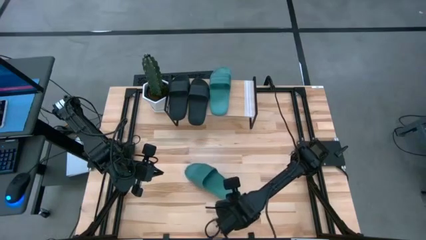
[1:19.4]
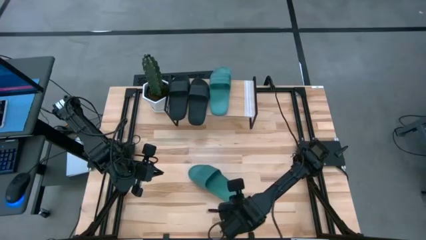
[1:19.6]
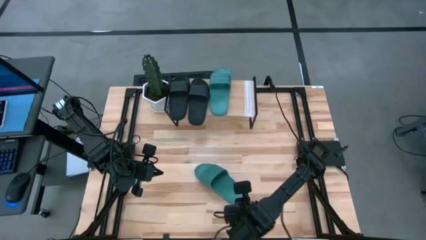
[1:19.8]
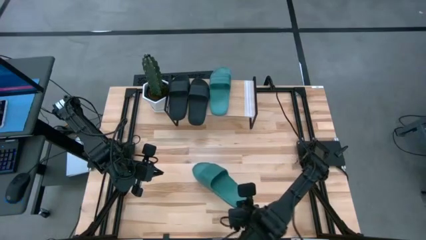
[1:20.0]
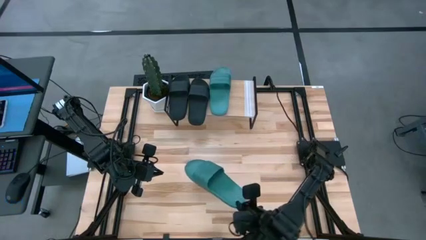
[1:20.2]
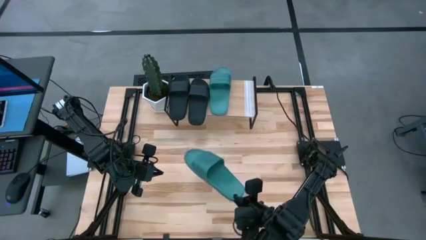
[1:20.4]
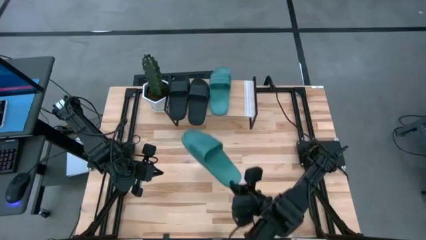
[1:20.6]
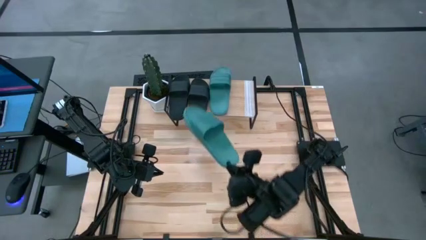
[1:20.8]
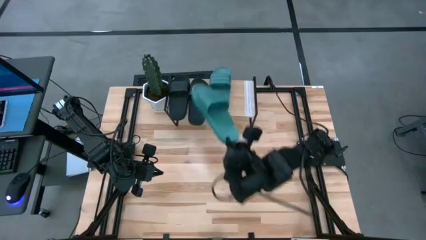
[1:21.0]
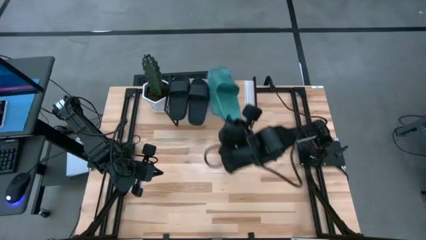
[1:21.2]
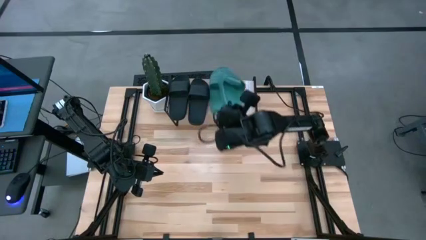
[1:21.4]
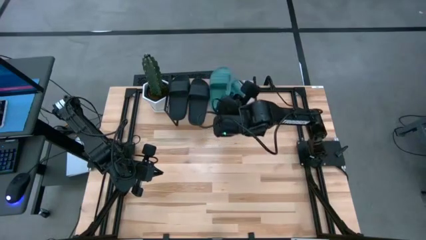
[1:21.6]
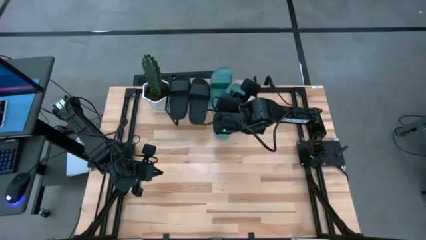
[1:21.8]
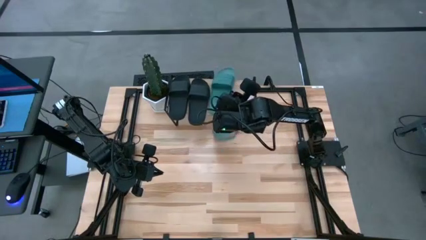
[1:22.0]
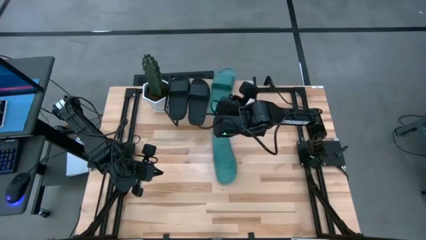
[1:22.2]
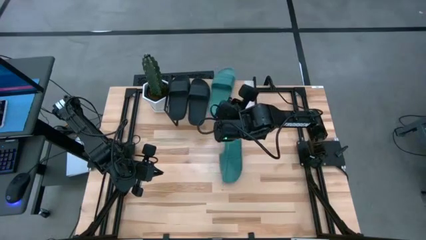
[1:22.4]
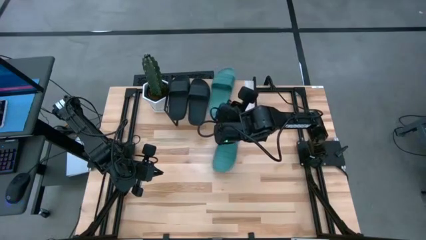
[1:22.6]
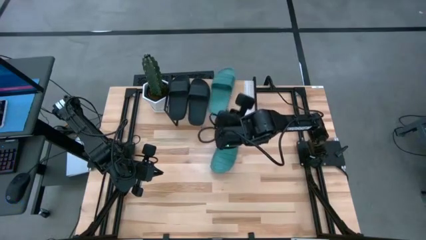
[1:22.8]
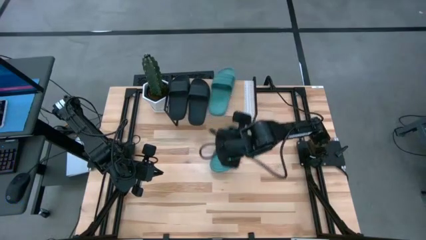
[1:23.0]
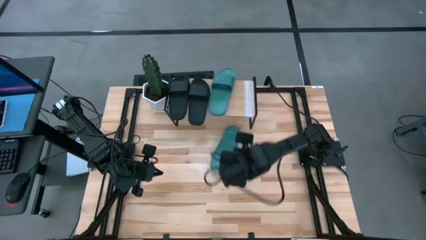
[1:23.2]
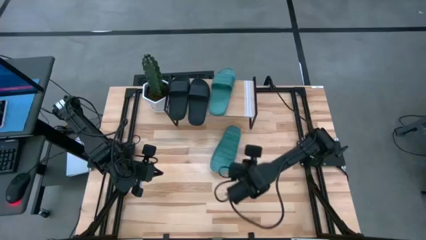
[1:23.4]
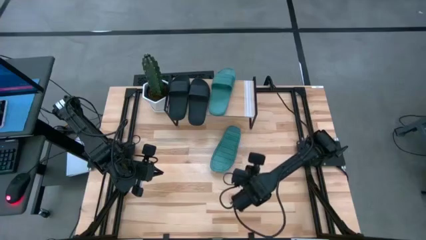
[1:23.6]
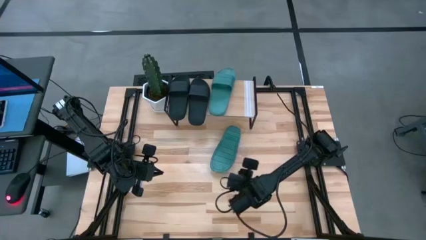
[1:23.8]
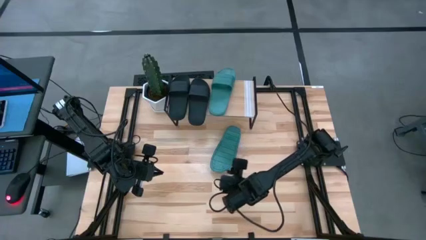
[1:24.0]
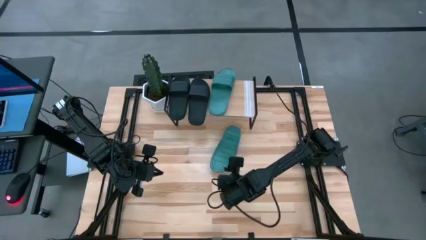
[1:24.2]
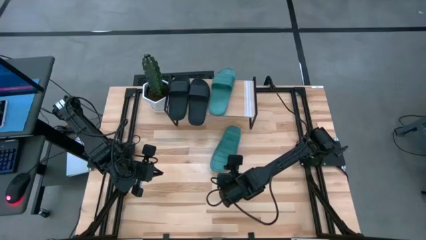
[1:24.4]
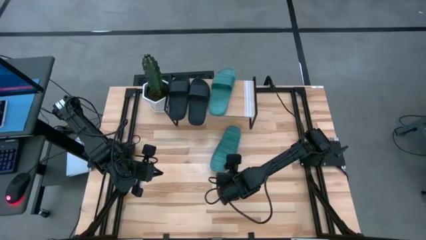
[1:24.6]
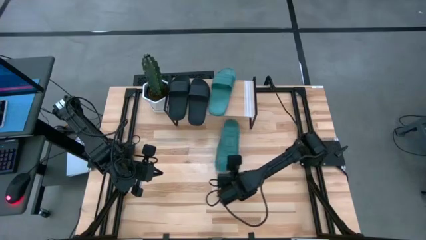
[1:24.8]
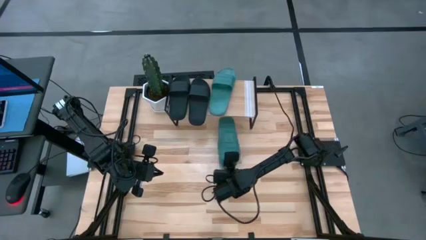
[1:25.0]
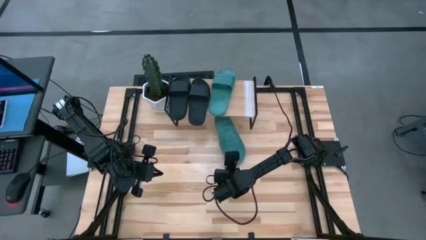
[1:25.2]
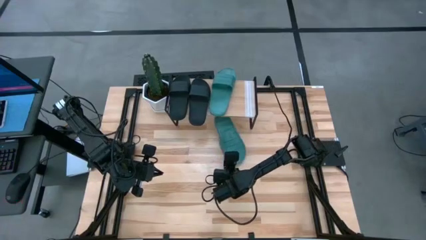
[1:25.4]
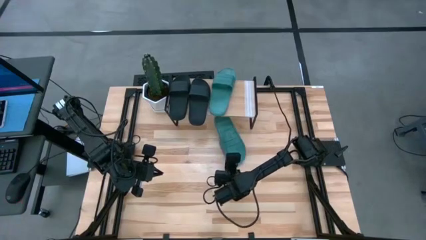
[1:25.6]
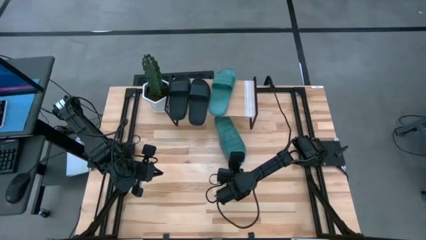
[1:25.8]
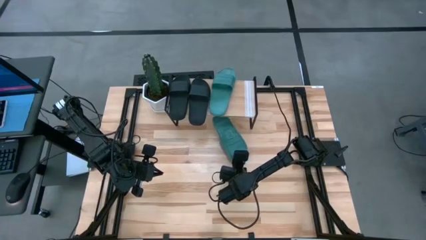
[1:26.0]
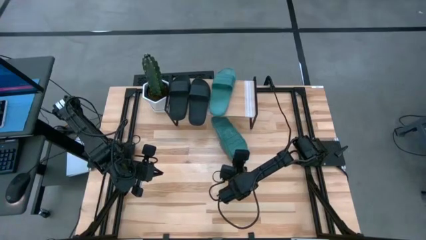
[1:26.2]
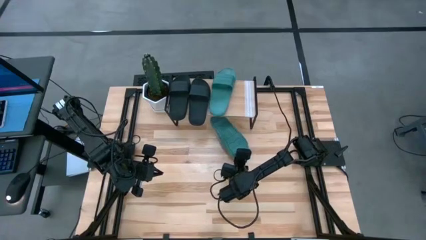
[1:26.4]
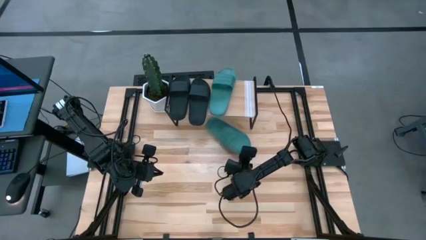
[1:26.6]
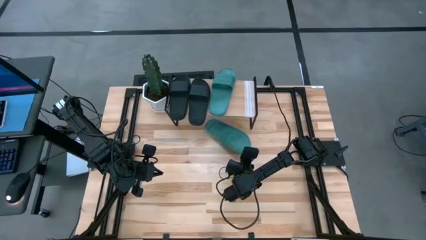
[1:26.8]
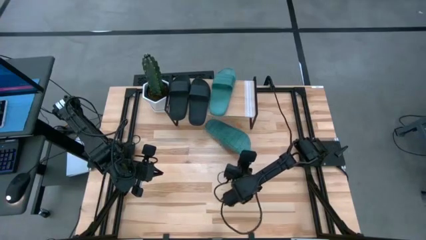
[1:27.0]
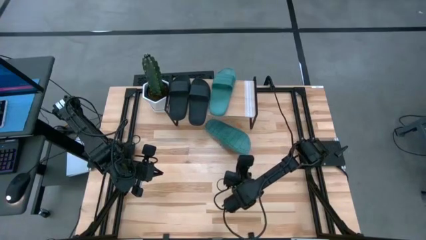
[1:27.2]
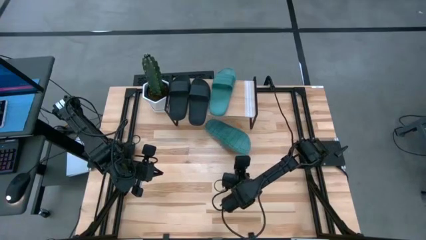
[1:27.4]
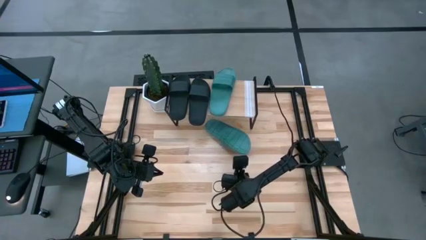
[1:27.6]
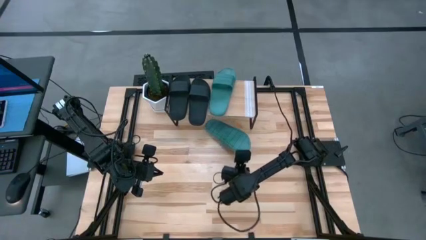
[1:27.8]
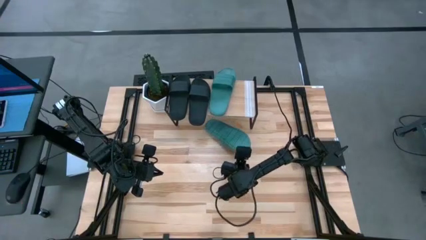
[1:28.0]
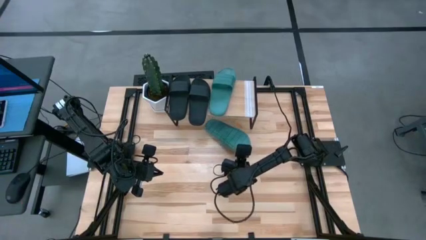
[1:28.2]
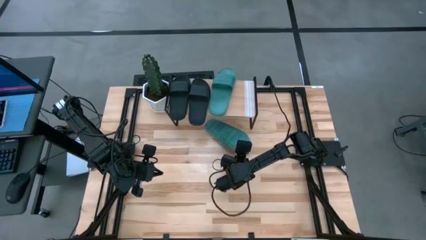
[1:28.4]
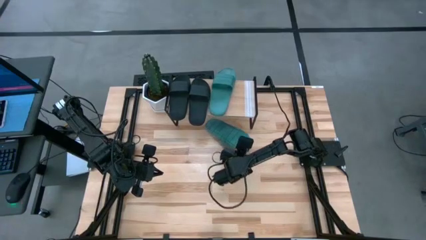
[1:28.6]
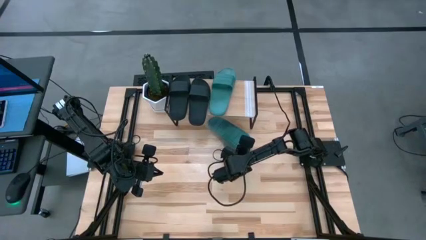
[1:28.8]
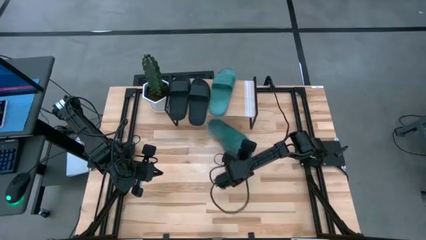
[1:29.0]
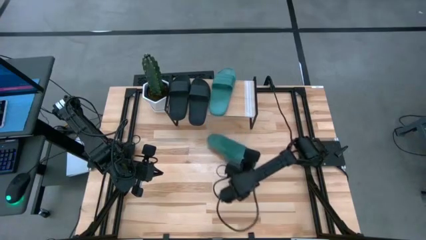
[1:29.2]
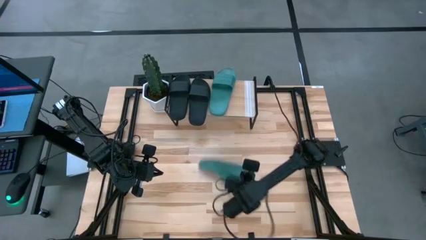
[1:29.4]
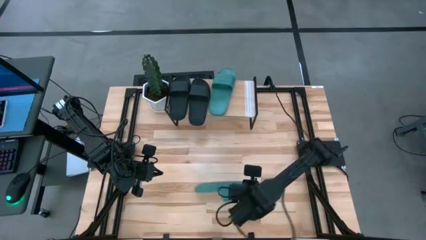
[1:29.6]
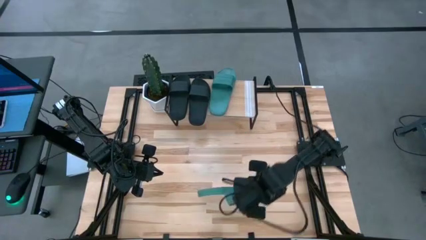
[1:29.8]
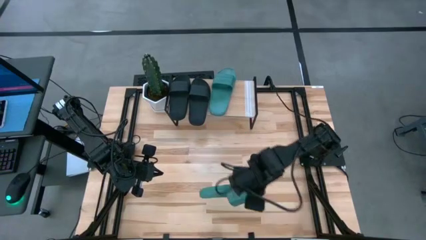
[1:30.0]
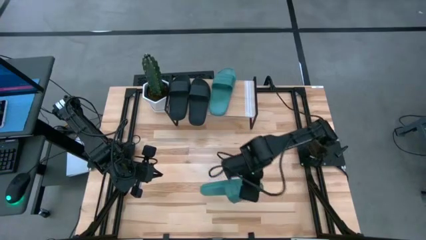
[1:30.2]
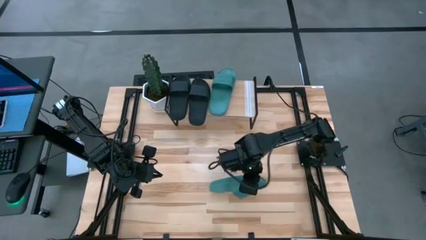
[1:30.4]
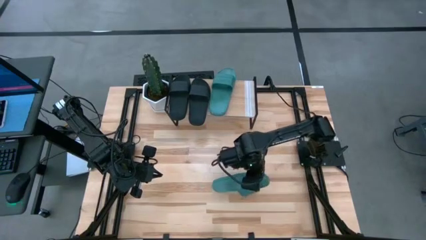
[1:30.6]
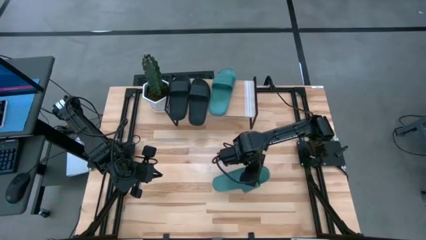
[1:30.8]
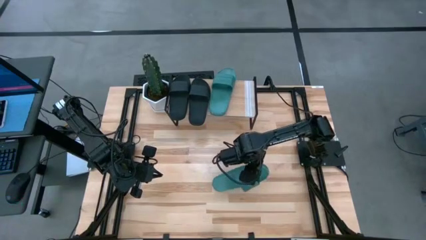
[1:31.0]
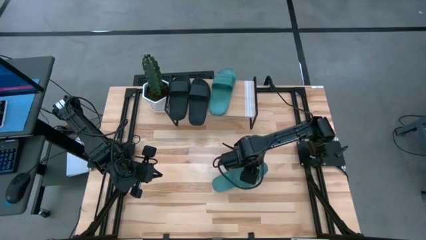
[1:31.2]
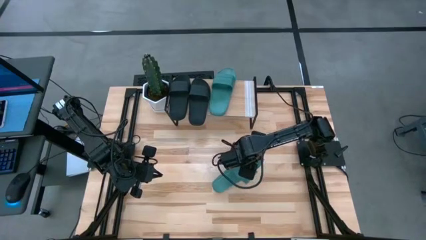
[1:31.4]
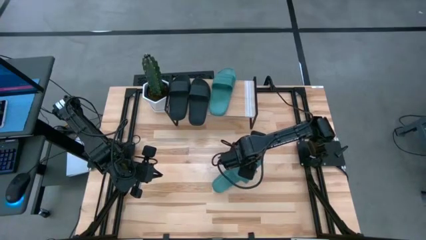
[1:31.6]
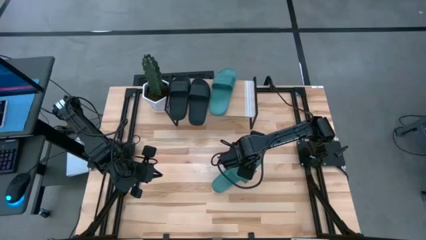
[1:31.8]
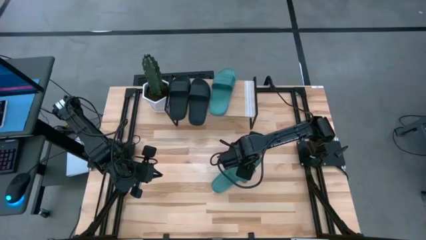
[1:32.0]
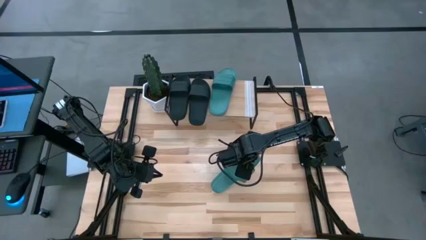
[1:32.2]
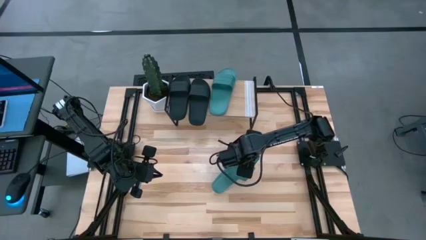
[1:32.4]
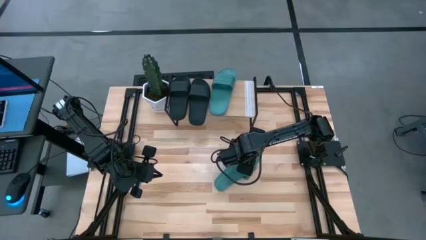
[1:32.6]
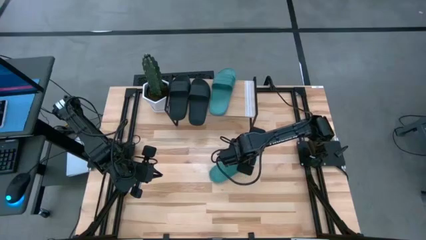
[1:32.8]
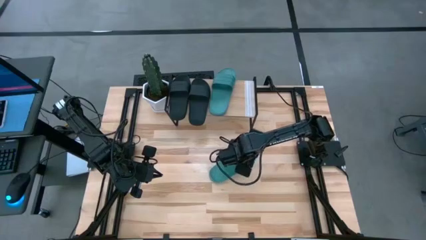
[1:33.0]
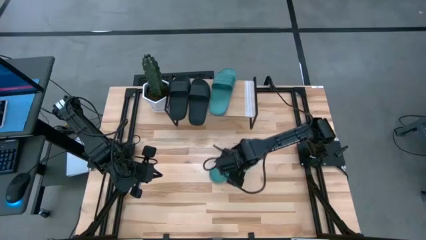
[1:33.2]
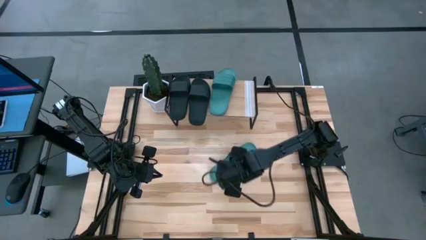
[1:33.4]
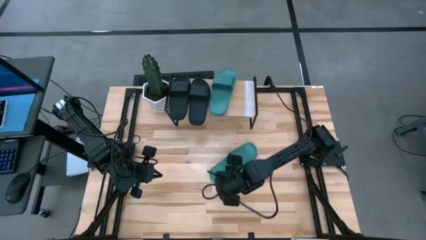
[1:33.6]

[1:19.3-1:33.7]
Task: Pick and place slides into the shelf
Put the green slide on the shelf

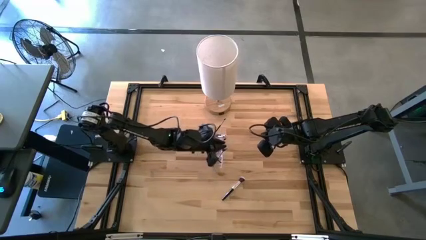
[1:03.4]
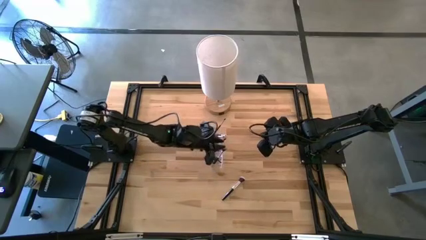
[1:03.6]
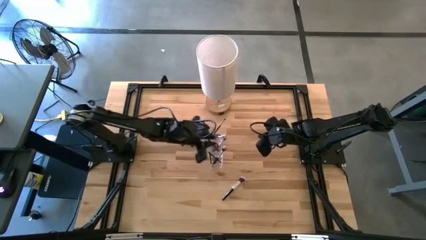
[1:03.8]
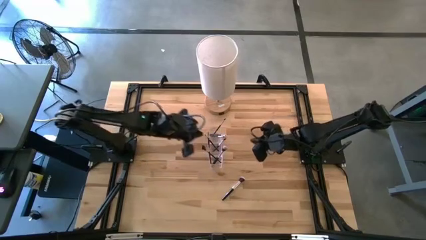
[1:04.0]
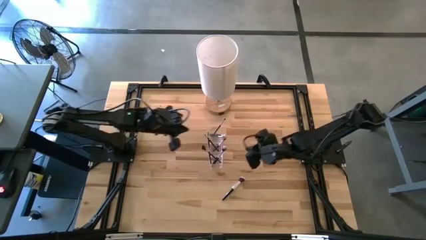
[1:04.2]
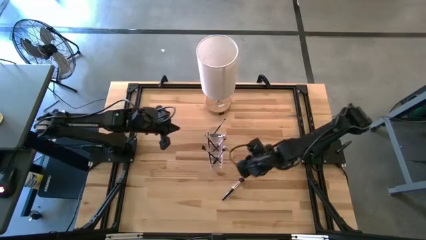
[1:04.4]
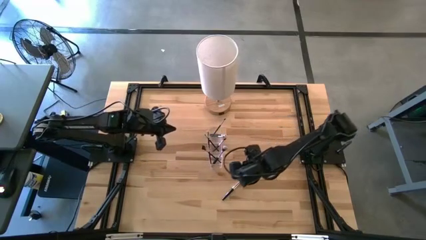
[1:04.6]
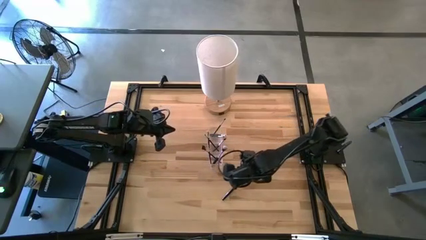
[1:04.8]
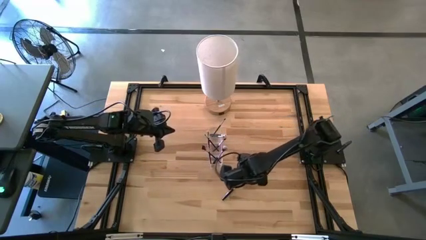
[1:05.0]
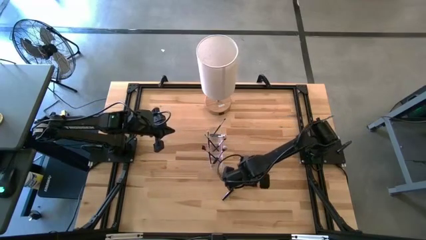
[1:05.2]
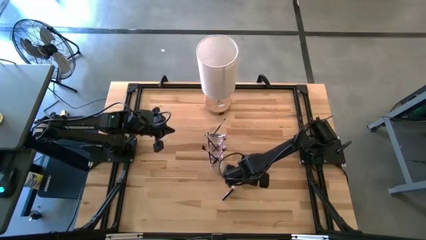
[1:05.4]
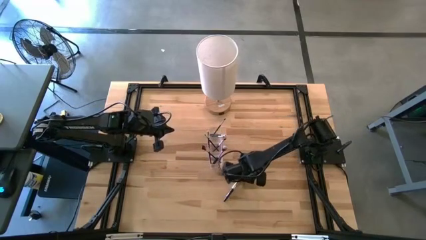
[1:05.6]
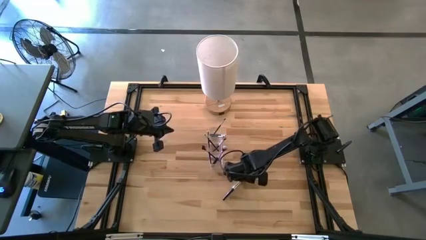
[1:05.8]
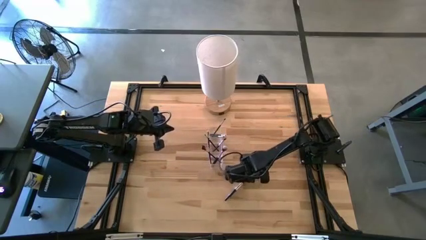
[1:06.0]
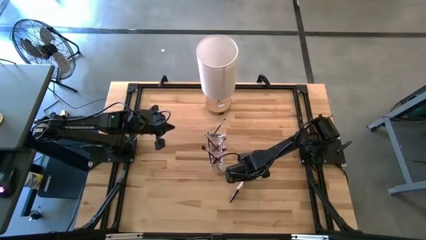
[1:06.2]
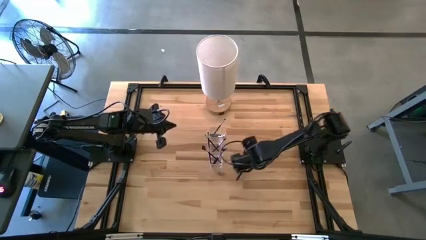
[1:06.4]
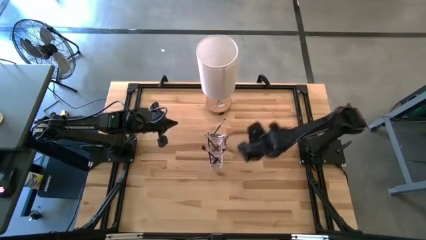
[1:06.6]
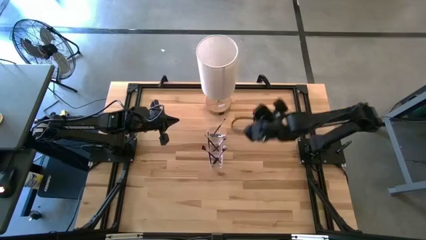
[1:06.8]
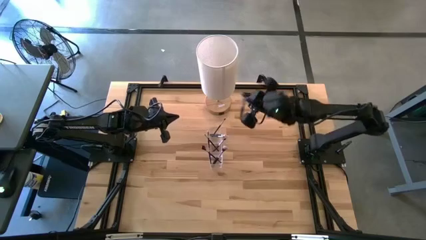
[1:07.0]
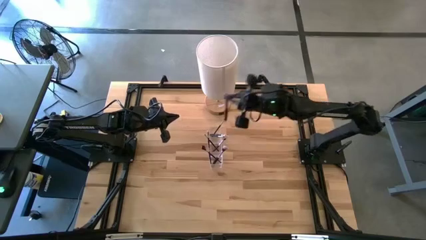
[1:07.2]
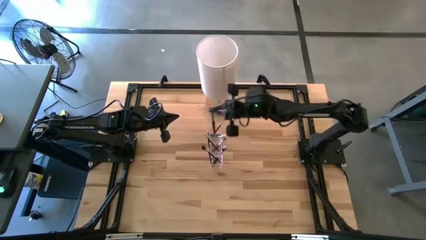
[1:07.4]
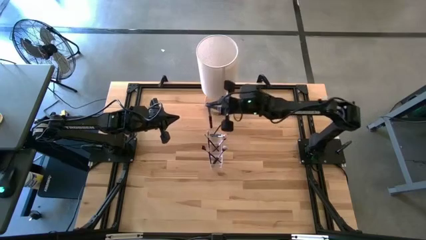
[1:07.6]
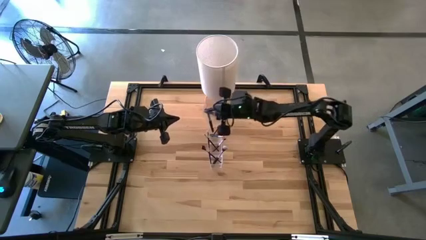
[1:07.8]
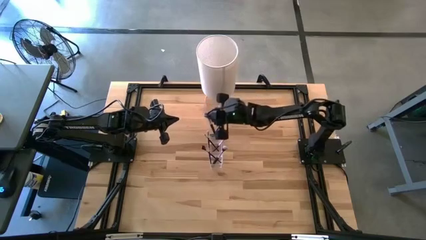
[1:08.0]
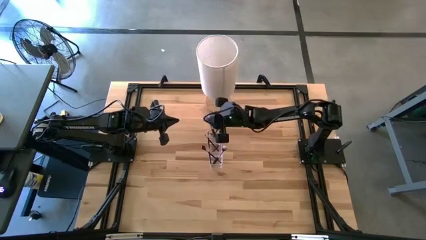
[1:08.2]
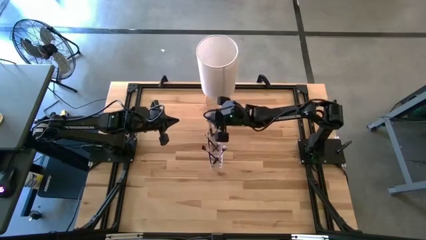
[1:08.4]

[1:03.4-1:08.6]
Task: Put items in baskets/containers
Put the black blush brush into the transparent organizer
